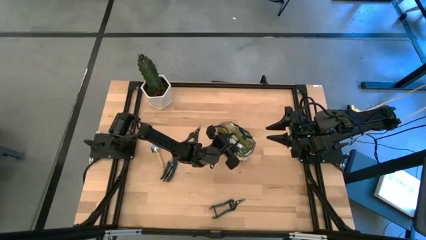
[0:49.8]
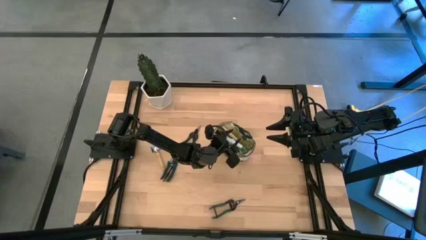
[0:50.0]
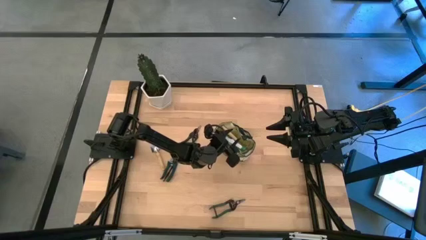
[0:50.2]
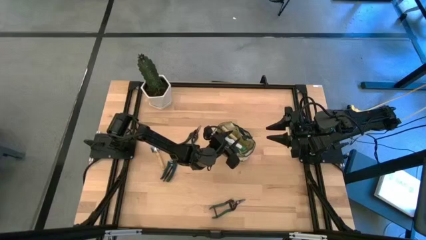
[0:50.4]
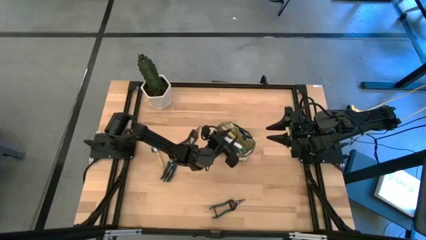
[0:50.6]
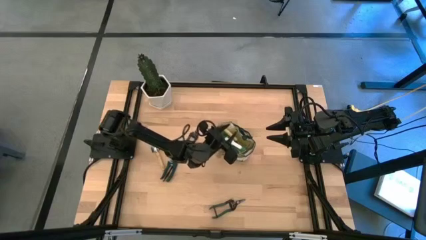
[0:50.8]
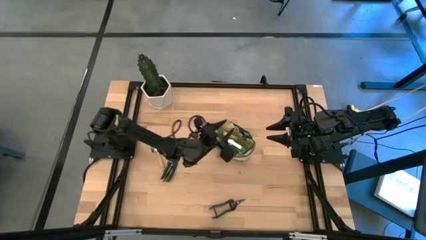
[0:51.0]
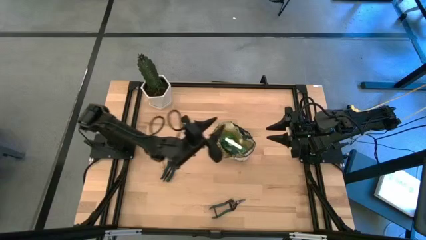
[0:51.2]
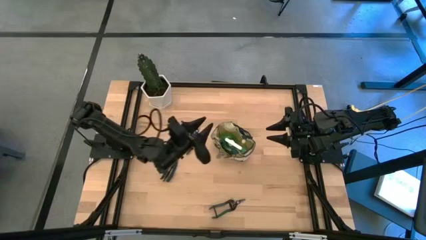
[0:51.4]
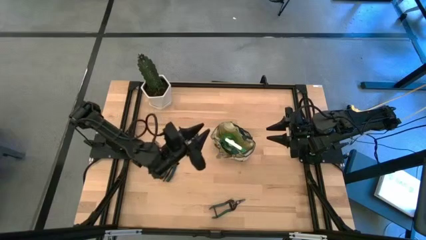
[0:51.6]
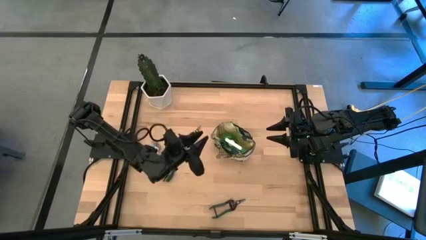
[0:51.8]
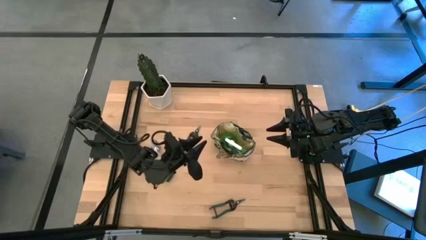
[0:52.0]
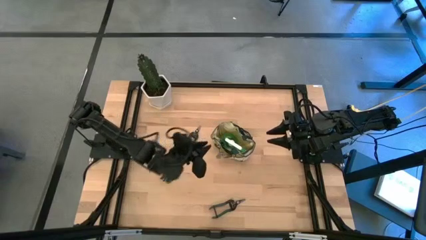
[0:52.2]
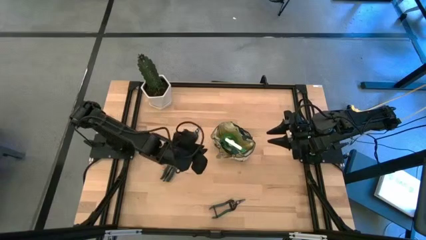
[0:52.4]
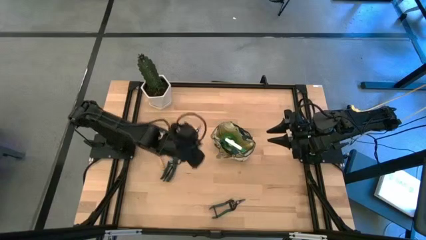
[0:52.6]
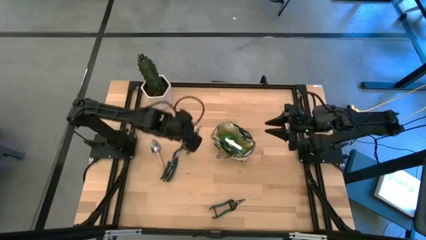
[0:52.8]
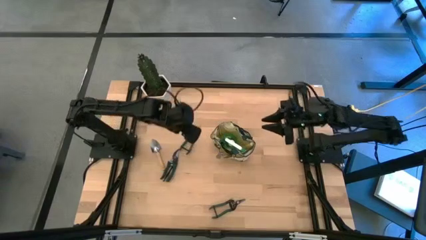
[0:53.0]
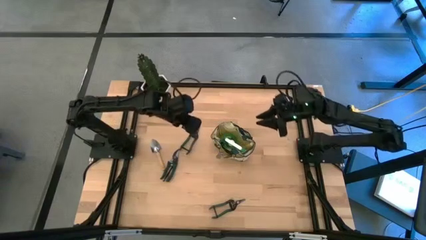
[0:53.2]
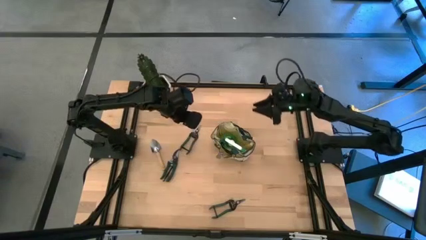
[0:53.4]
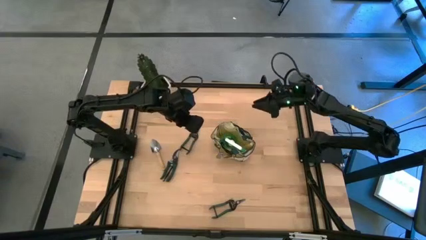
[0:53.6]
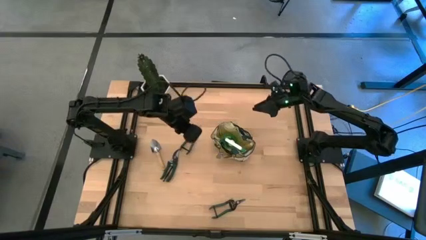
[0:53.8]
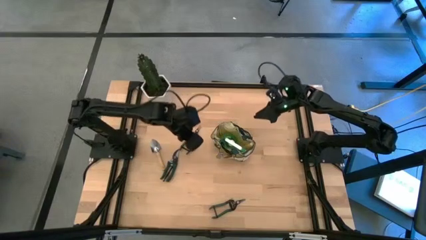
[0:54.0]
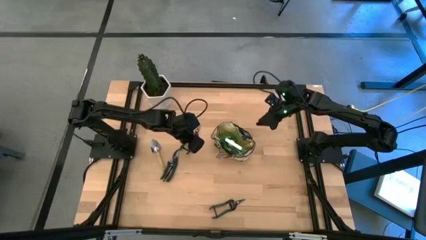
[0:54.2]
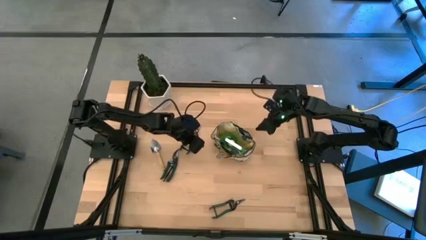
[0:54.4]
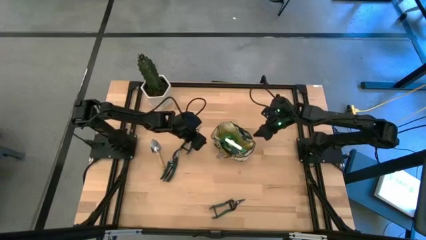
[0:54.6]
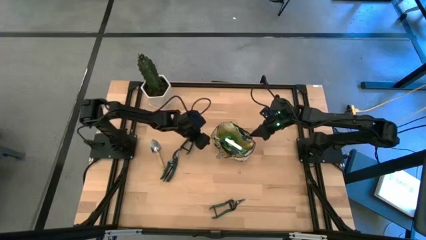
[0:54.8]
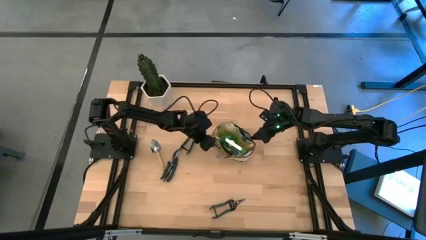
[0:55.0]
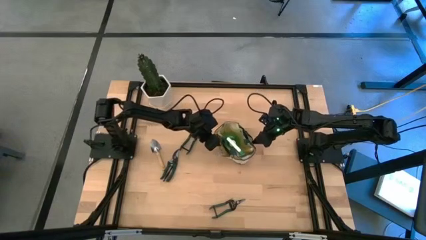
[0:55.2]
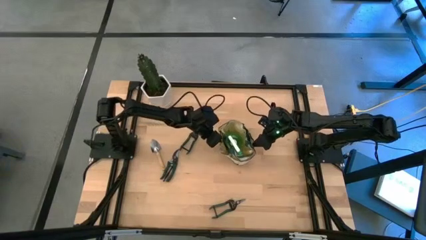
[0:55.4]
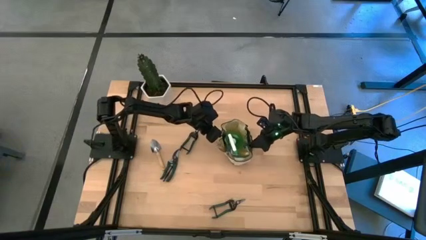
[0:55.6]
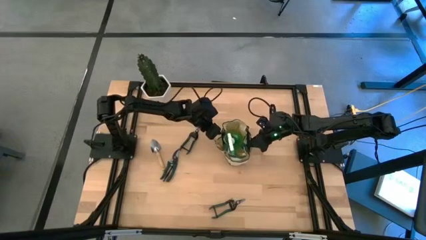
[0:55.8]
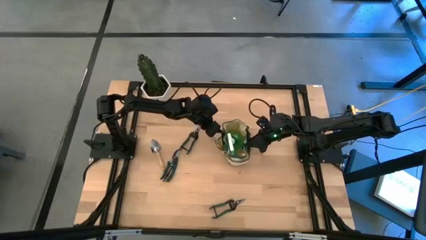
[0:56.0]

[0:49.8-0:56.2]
Task: Pick & Place Garden tools in Gardening bag
Adjust the gardening bag on the table

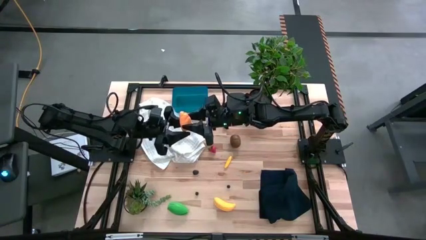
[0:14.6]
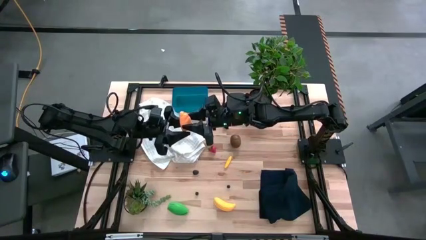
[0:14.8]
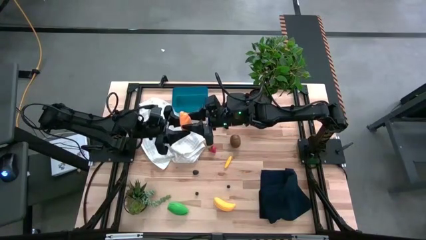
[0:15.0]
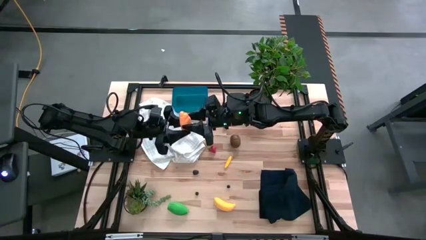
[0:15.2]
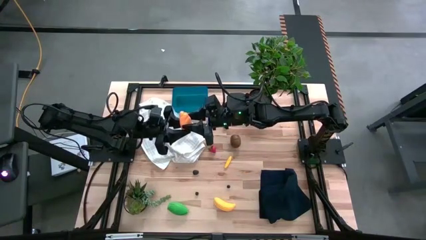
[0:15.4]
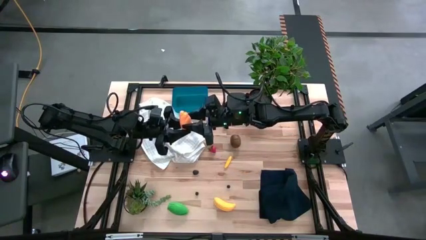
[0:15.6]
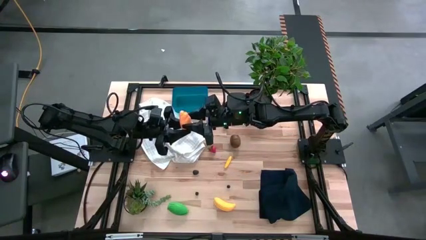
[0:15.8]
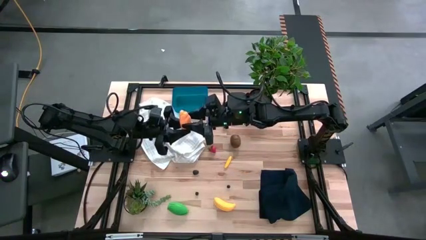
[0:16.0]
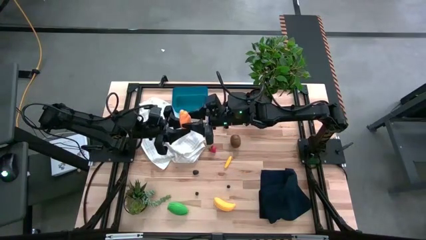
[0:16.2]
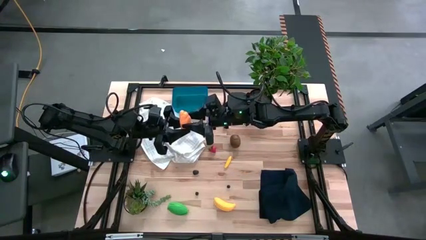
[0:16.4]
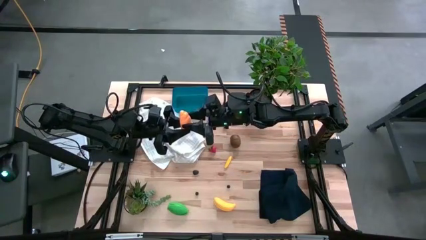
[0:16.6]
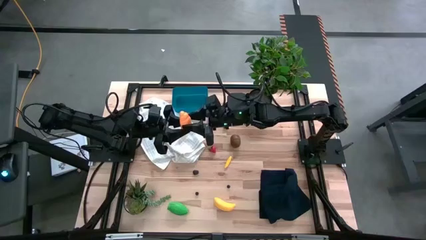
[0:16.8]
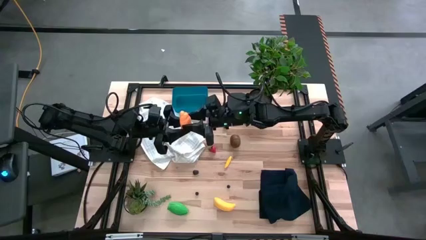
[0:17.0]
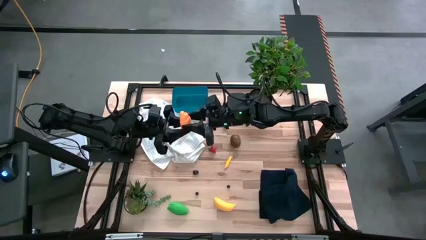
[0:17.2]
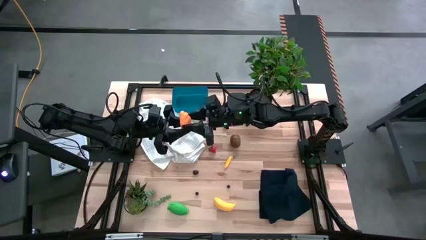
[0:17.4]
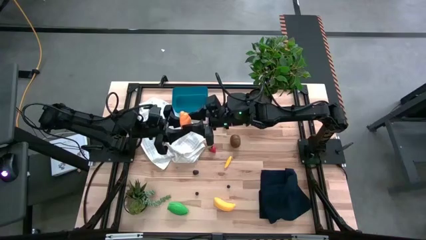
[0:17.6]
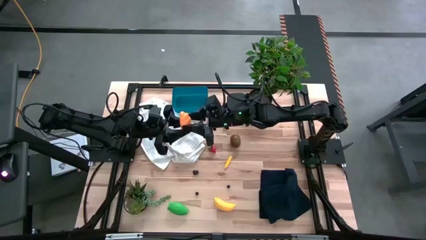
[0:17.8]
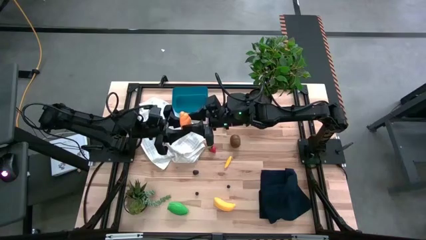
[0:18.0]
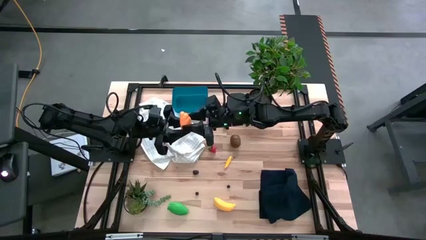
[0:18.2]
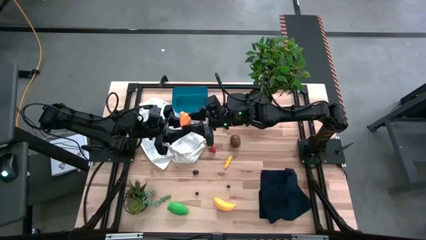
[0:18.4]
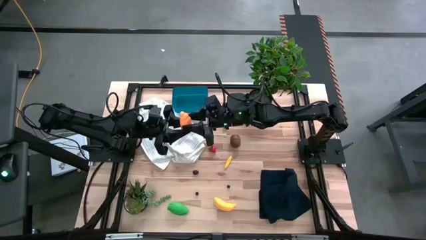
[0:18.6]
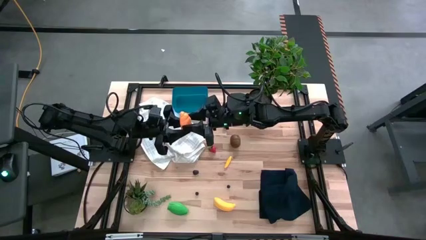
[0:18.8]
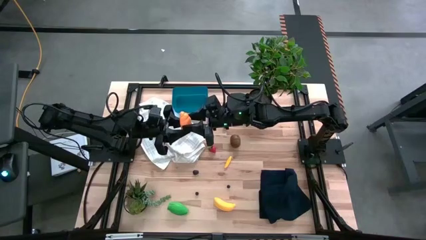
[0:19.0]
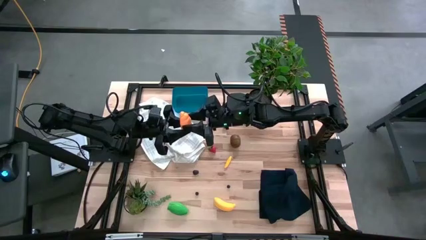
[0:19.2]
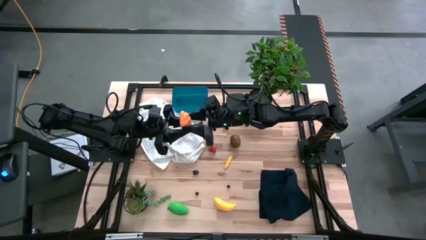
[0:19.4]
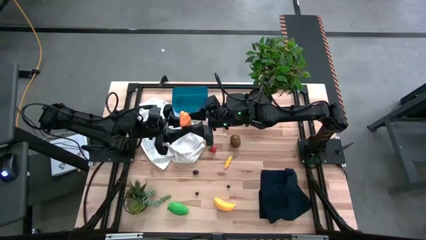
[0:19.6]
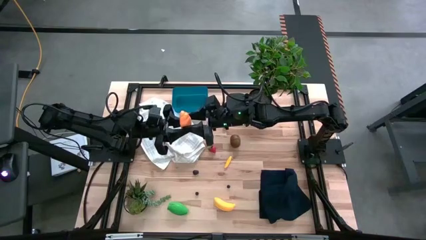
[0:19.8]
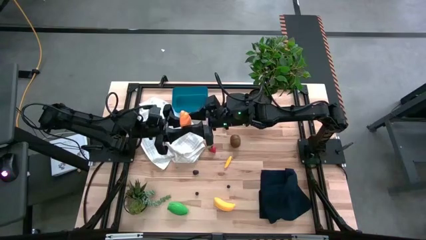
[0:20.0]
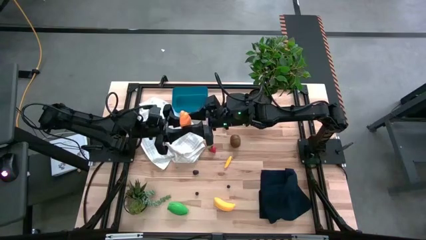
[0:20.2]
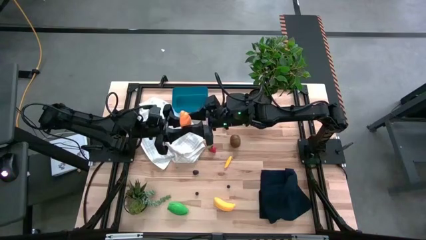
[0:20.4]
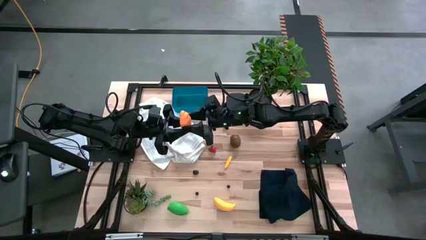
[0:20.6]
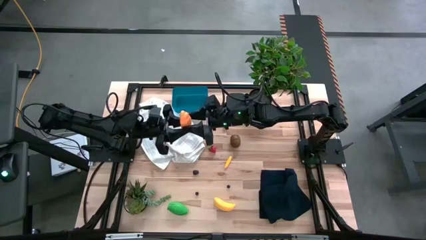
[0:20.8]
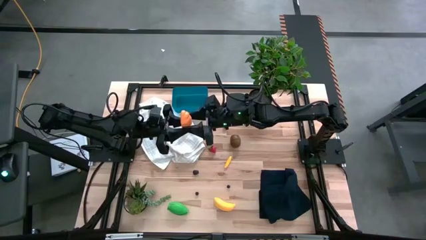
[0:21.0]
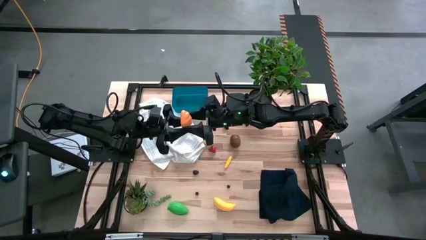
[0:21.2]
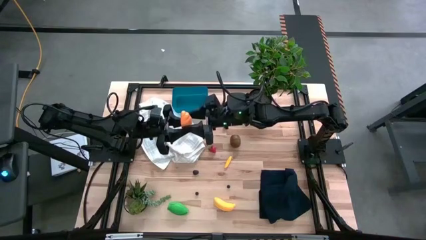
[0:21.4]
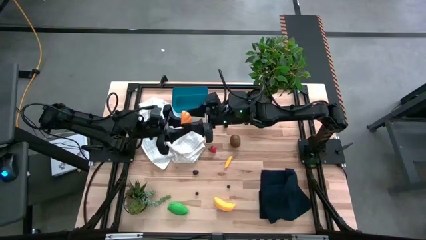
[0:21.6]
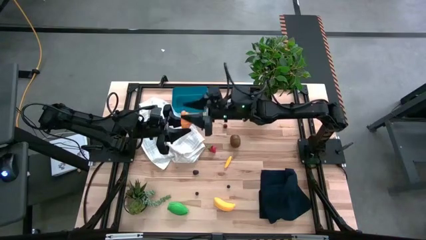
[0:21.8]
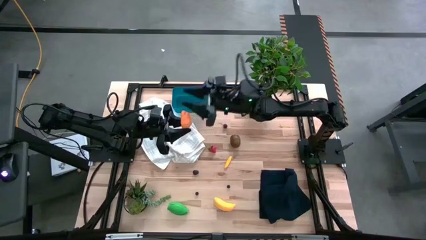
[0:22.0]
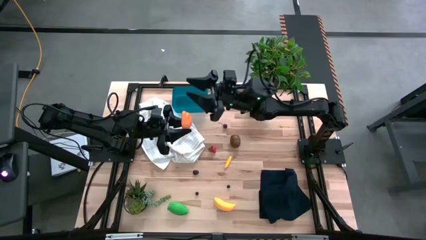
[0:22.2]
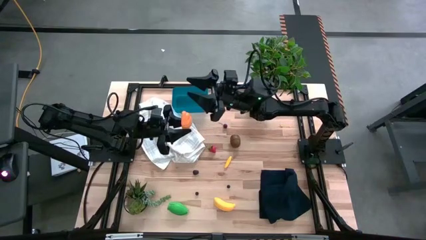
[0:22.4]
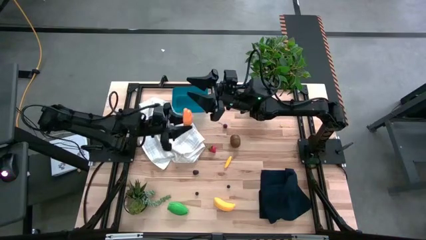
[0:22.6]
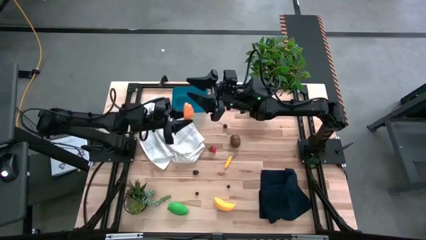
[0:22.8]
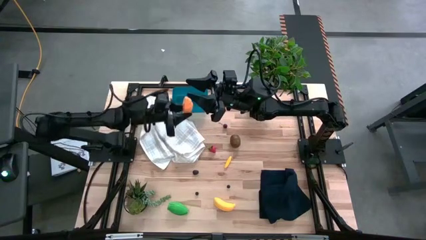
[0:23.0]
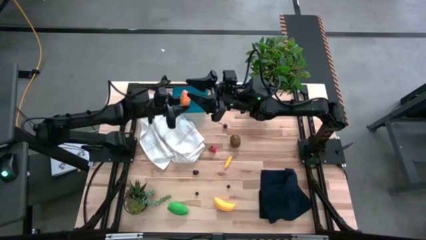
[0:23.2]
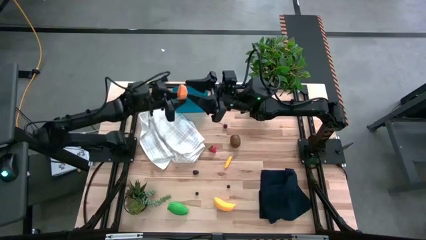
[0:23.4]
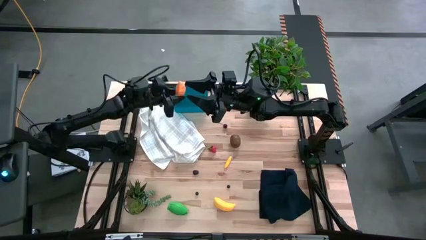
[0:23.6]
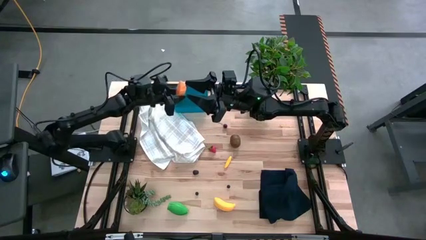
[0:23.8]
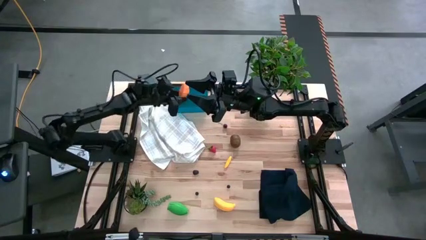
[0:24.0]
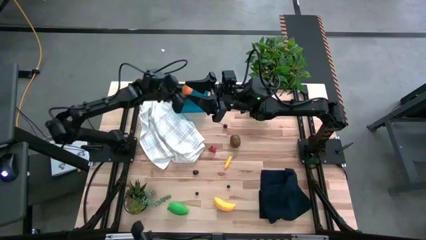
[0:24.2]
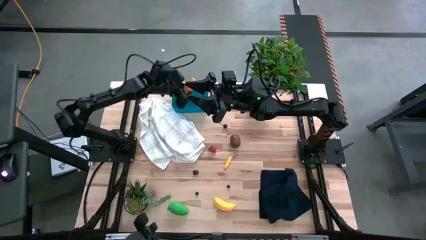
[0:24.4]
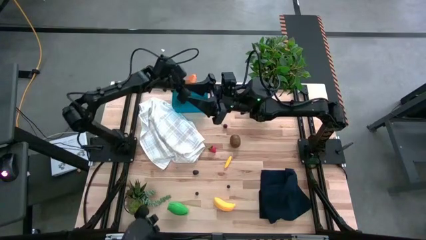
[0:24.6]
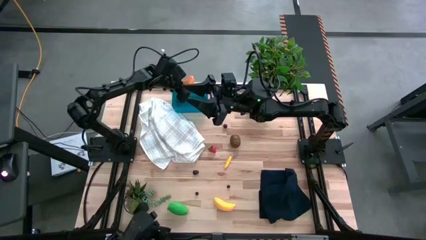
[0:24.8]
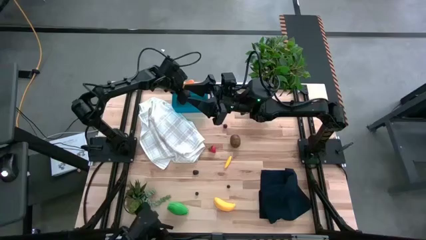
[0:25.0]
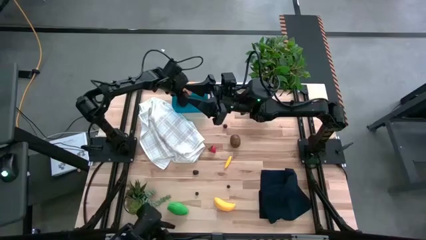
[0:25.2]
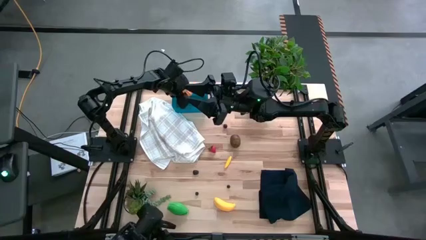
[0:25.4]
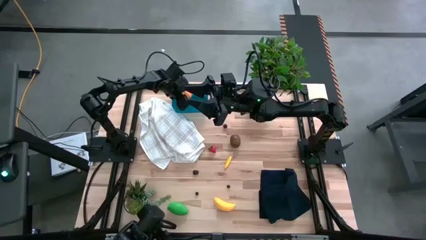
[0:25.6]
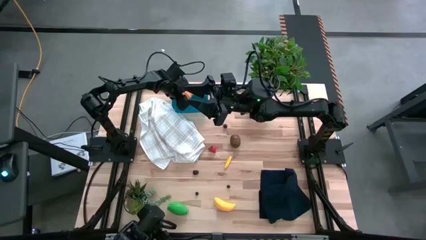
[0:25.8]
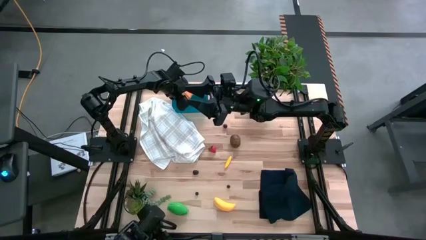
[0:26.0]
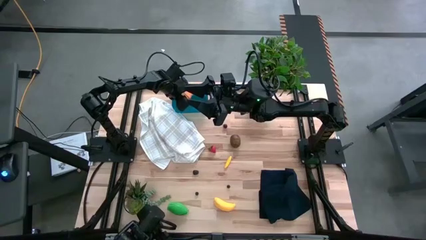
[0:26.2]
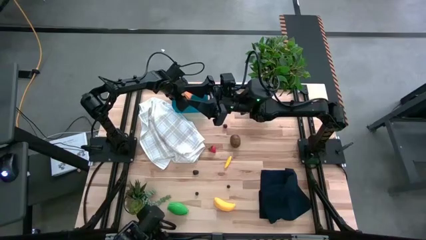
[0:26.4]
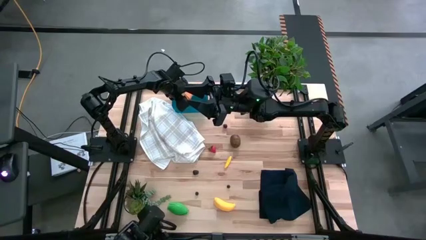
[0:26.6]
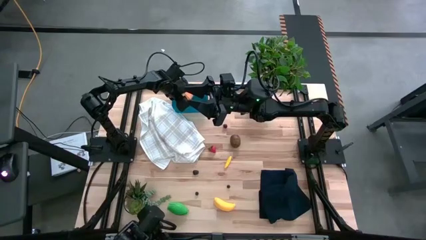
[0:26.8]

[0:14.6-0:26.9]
Task: Pick and placing Produce into tupperware
Put the yellow croissant into the blue bin
